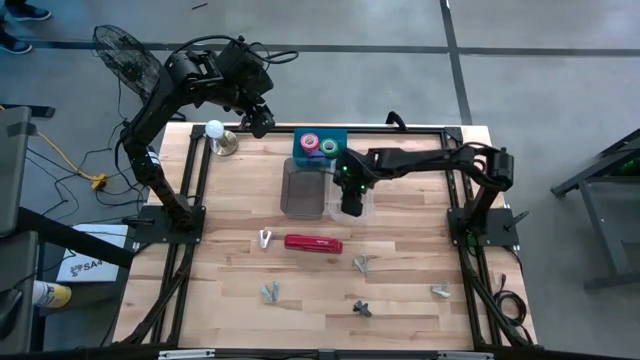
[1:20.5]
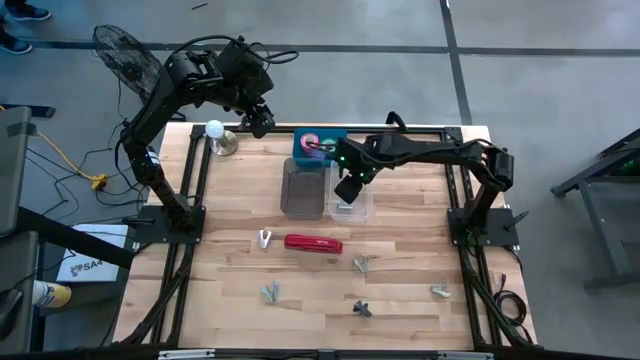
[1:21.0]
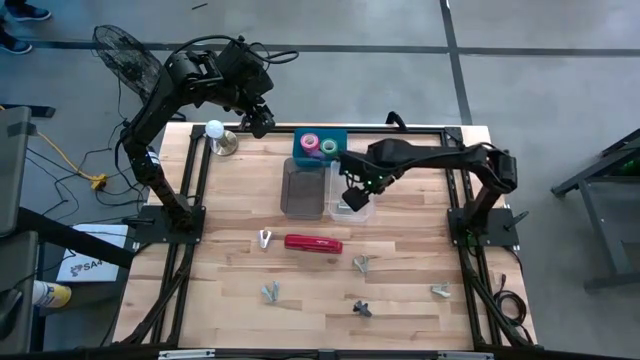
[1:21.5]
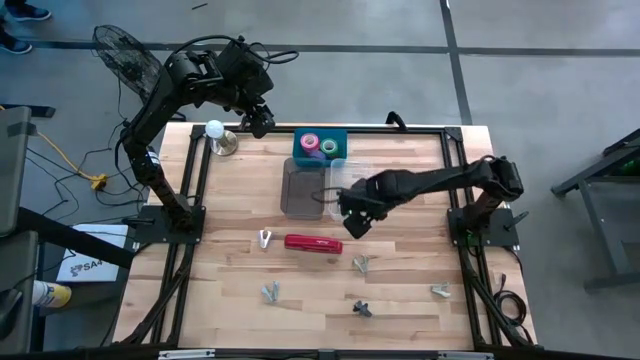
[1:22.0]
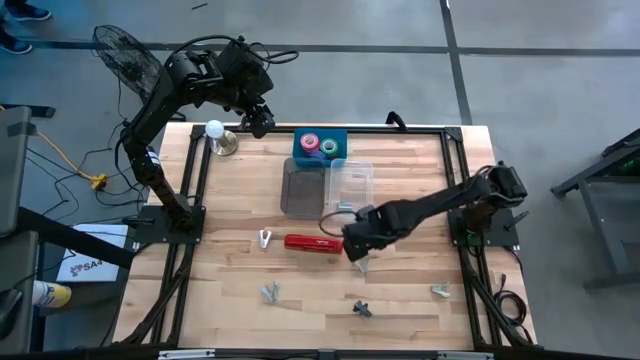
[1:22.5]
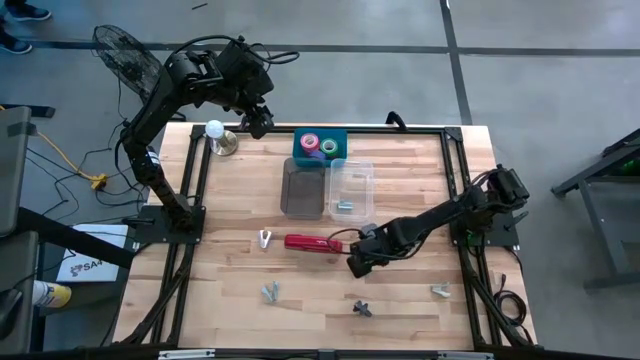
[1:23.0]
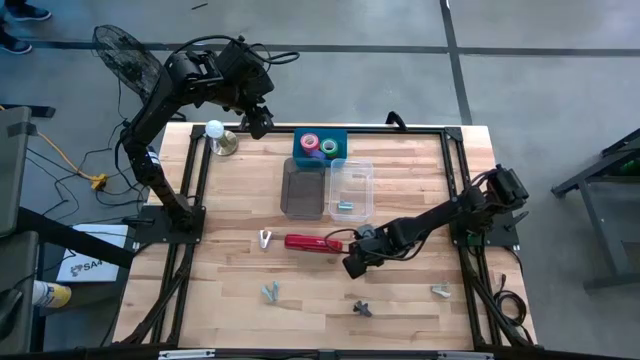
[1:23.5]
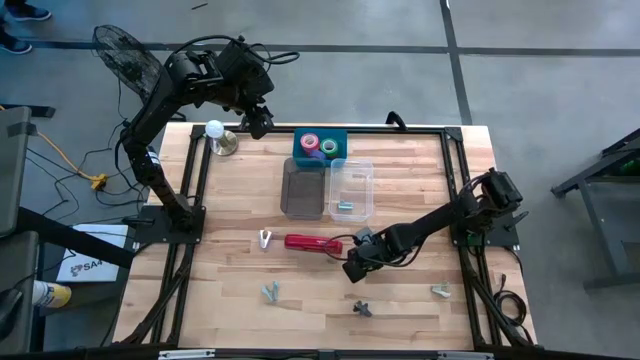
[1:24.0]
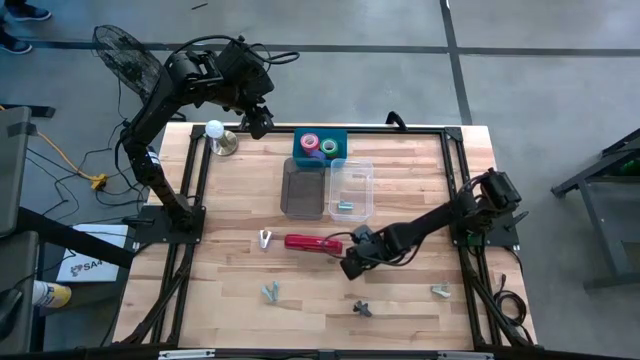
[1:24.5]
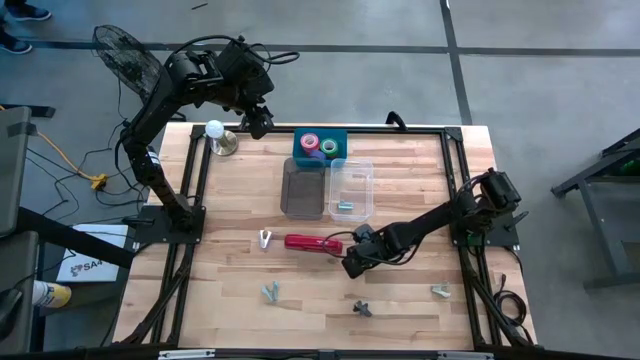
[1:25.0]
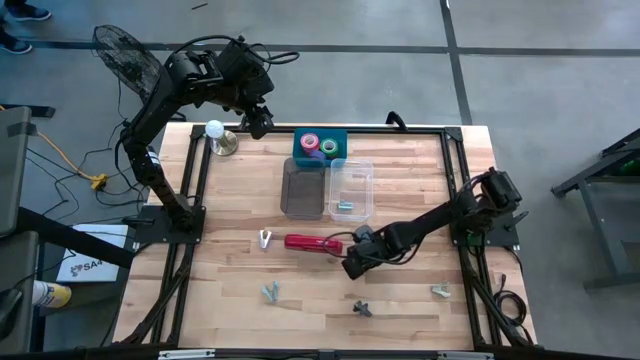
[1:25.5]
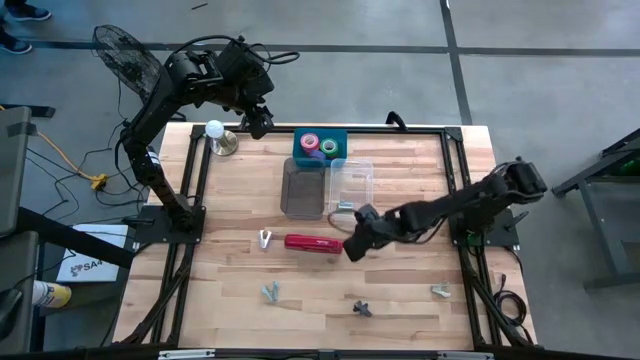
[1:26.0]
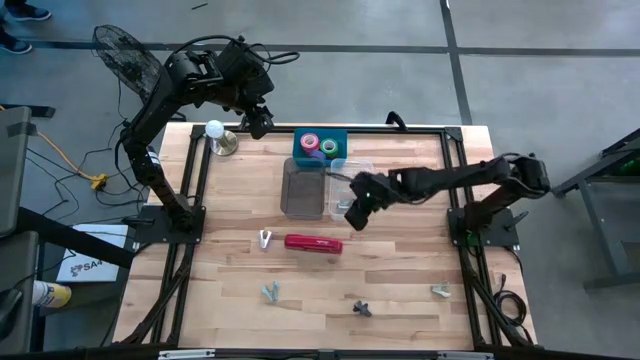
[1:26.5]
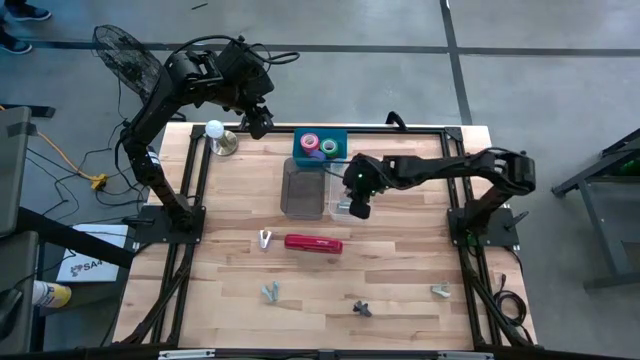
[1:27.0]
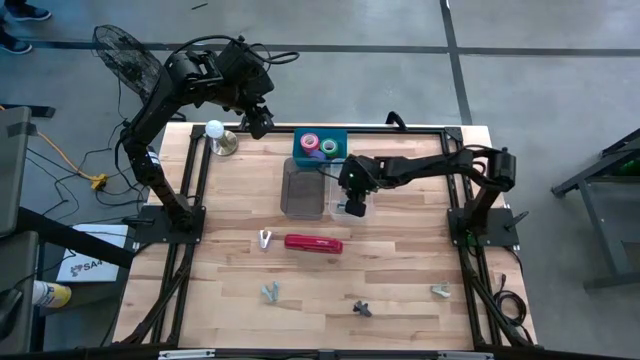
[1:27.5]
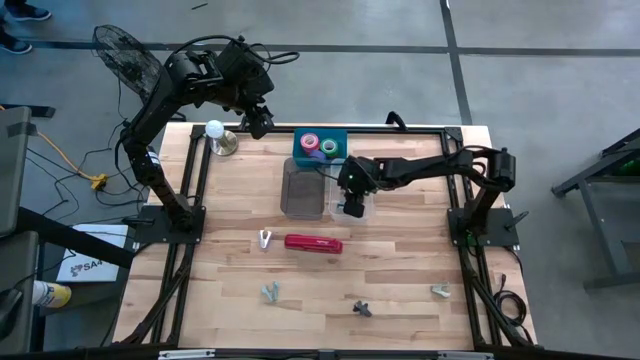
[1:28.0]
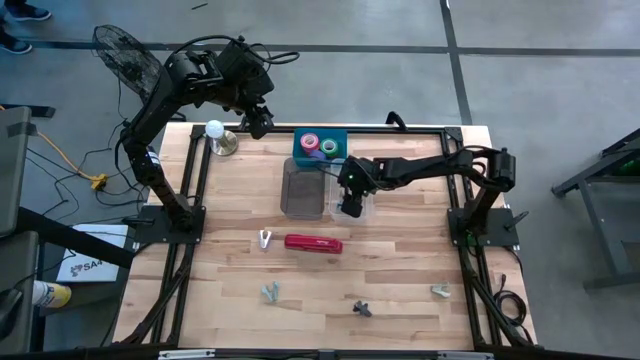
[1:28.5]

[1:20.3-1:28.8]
Task: Pick and place Stapler, Stapler remover, tape
Put the left gray staple remover into the transparent bin

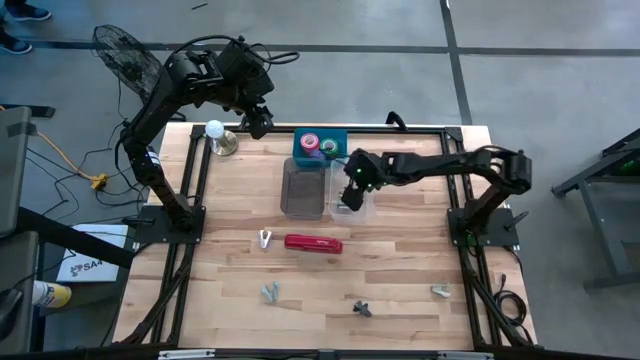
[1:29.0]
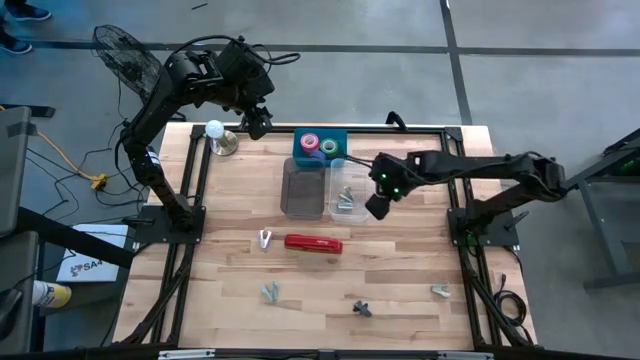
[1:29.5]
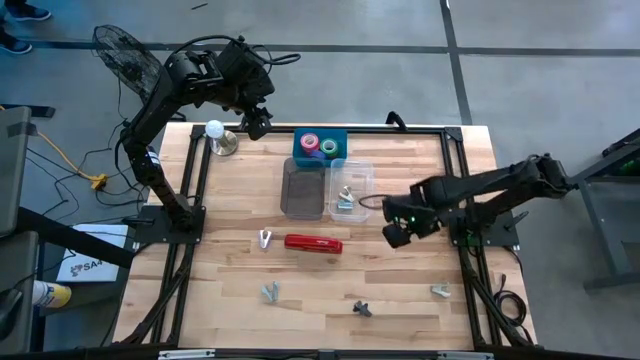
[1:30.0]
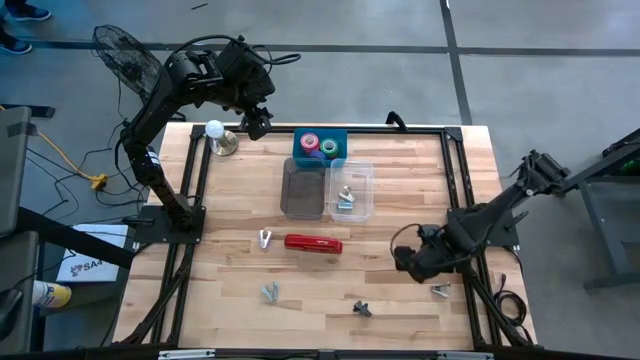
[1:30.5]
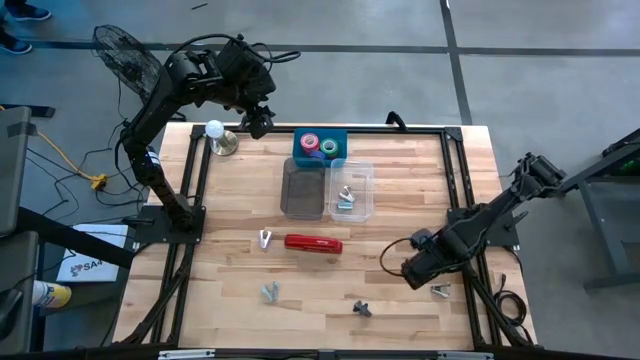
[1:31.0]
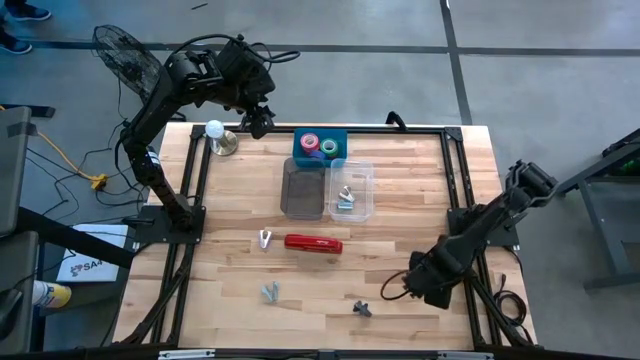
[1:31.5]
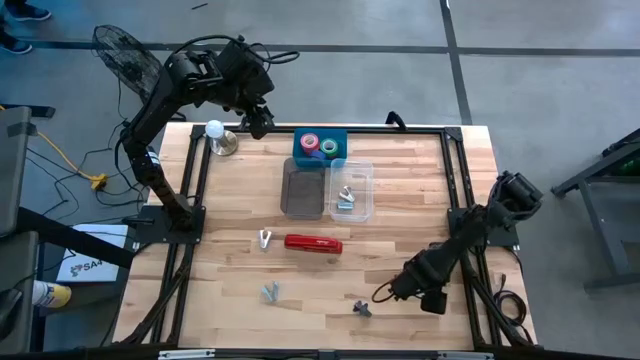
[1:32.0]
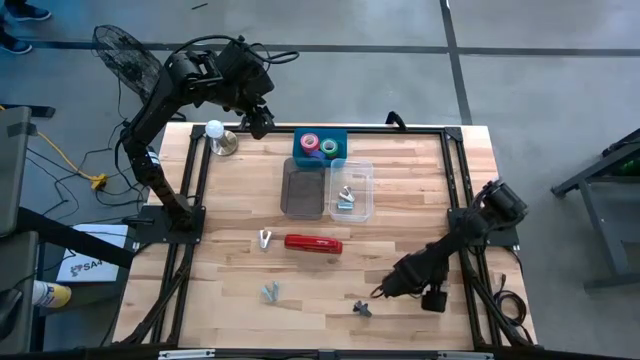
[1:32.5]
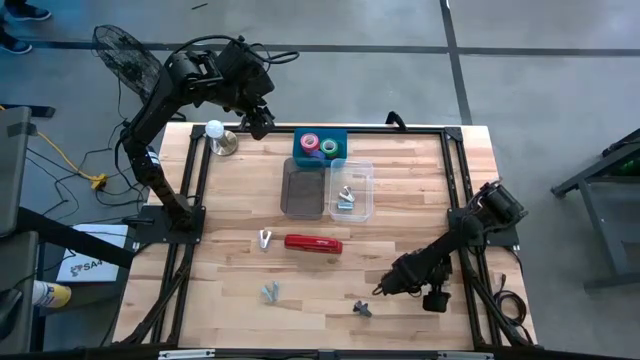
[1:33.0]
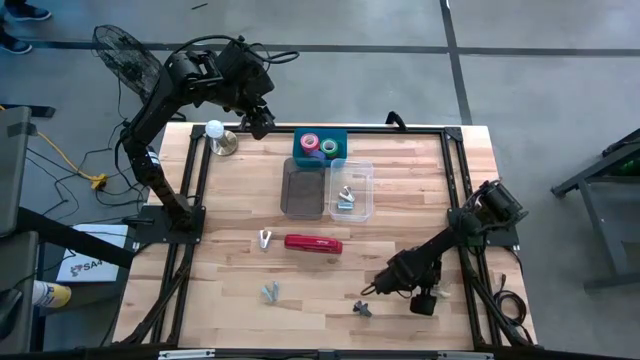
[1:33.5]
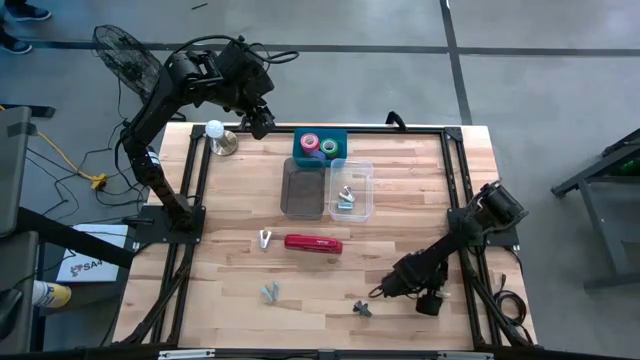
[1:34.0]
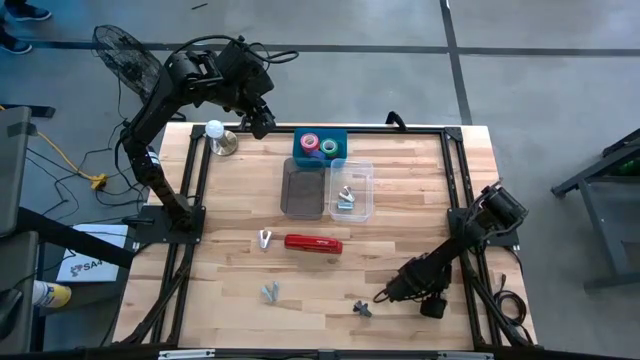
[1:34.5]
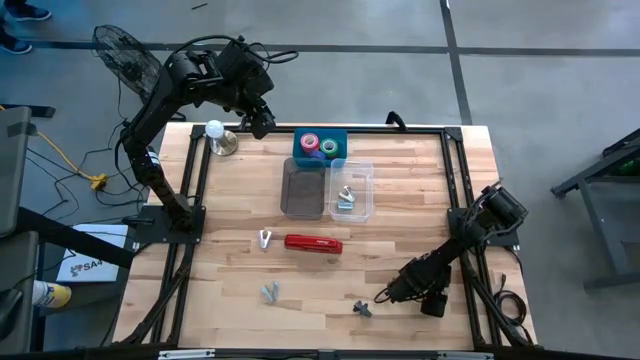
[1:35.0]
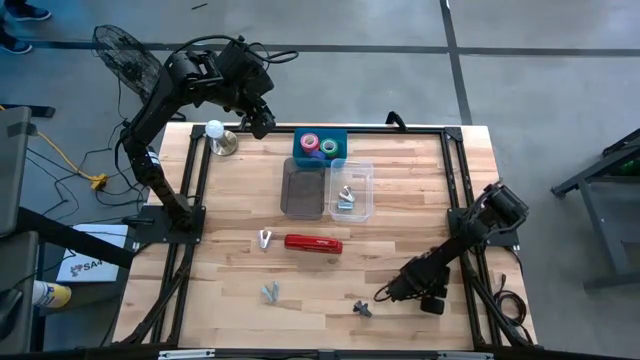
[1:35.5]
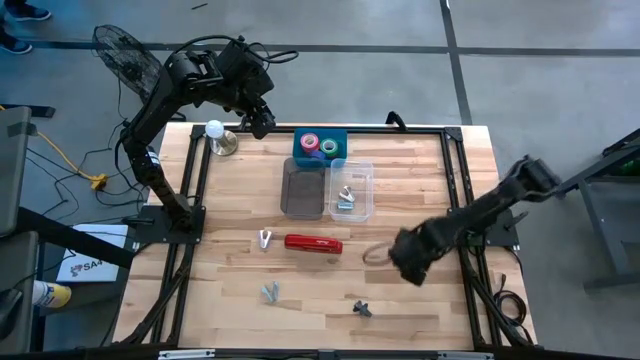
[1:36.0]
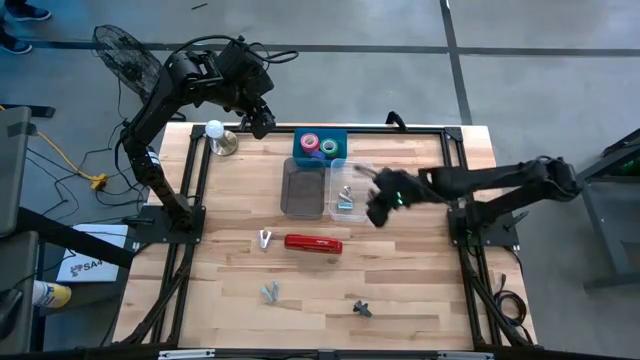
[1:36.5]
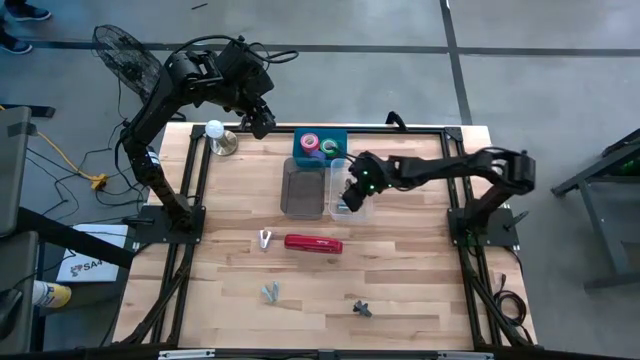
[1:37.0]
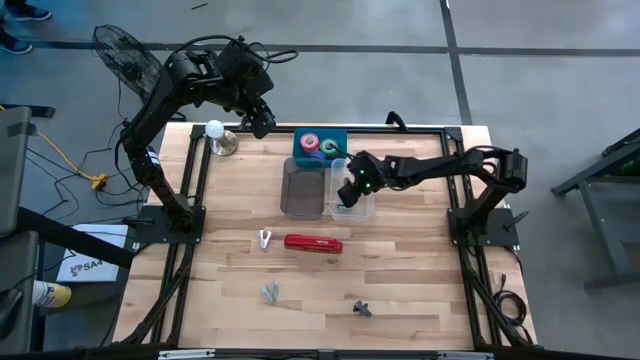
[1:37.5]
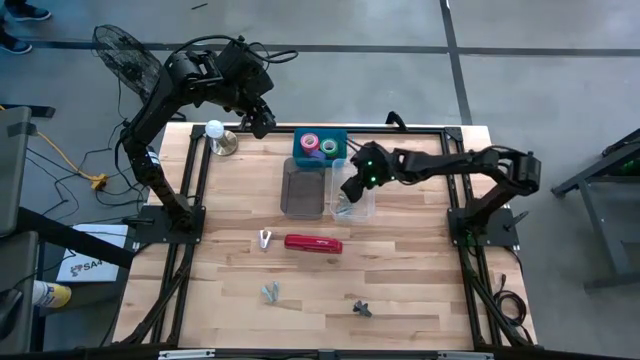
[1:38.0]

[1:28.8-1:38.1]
Put the gray staple remover into the transparent bin

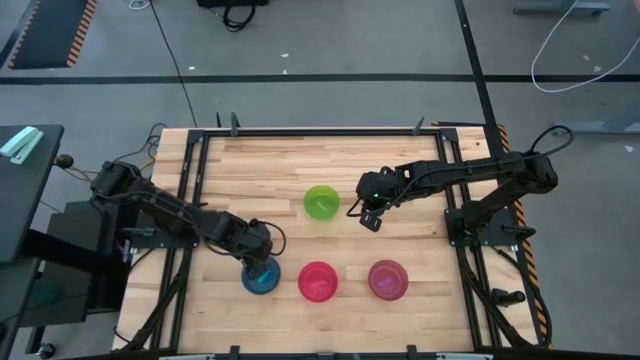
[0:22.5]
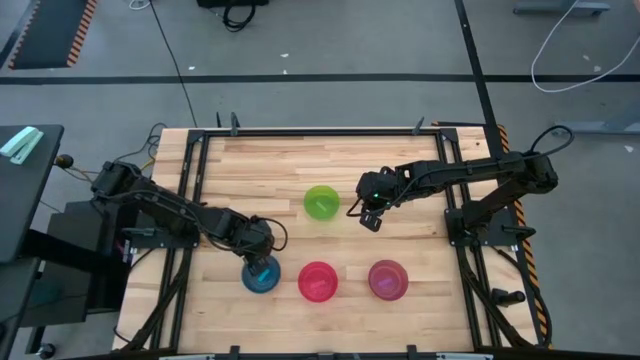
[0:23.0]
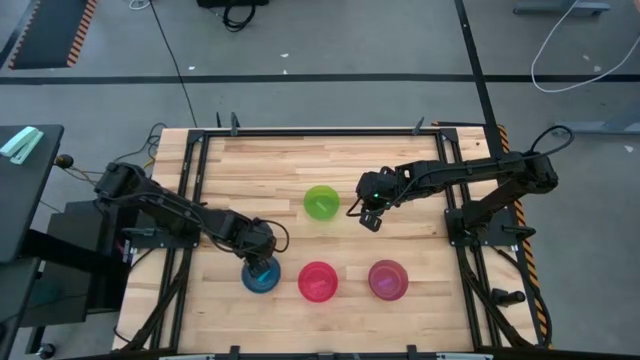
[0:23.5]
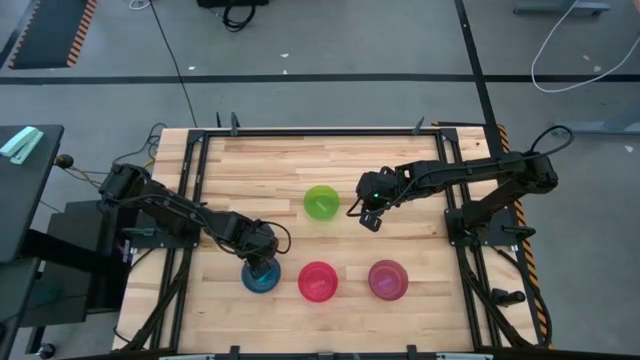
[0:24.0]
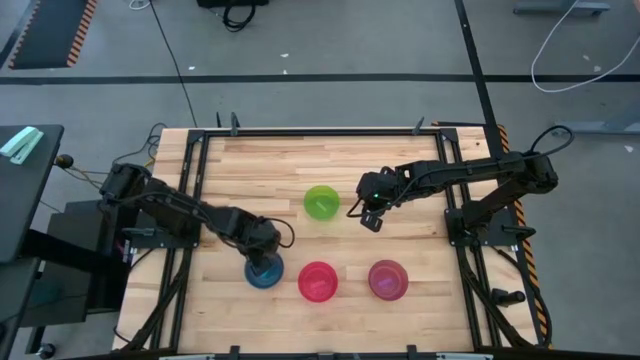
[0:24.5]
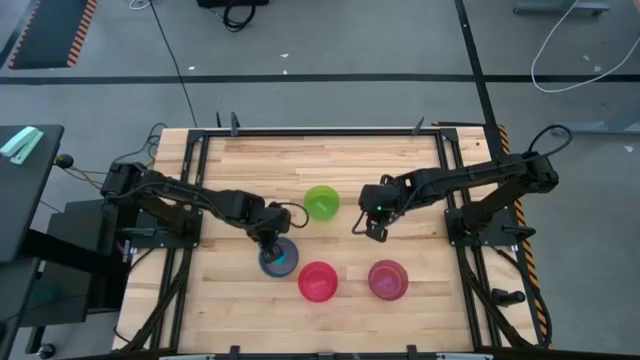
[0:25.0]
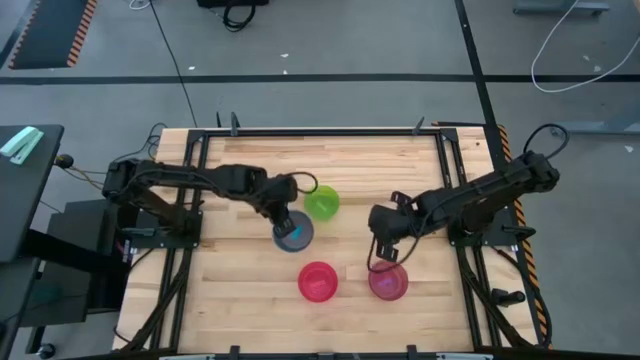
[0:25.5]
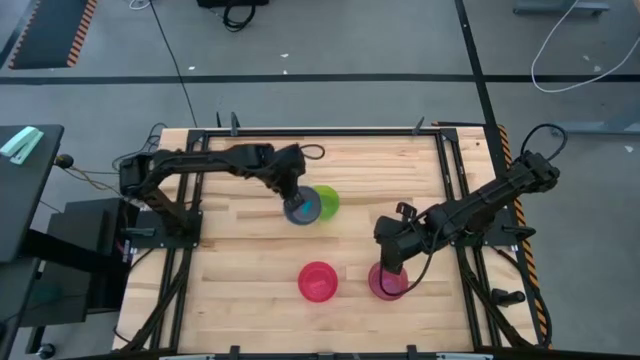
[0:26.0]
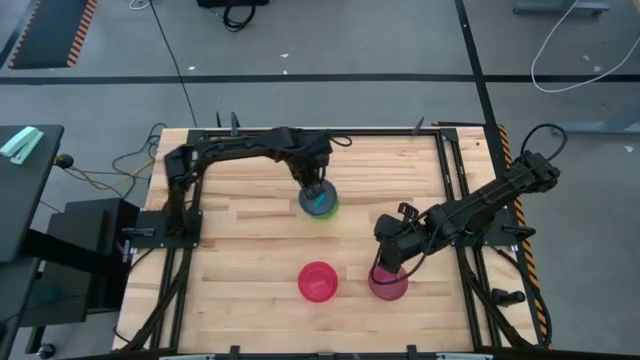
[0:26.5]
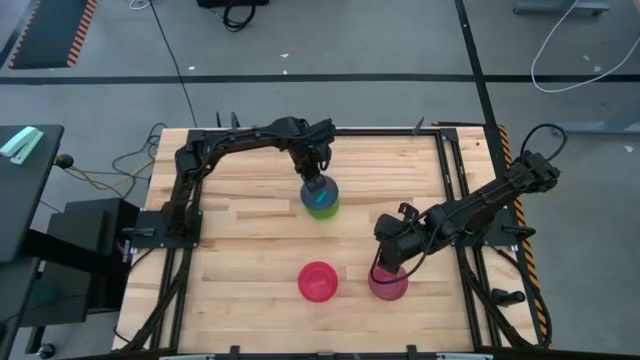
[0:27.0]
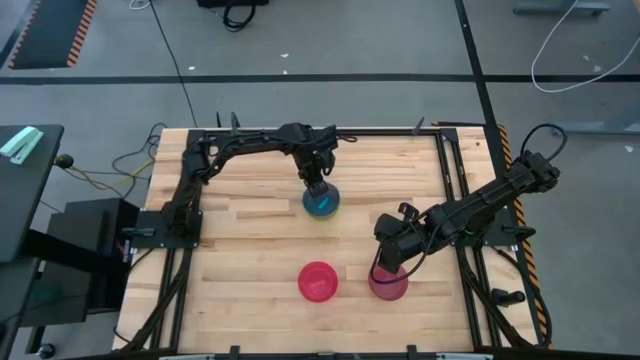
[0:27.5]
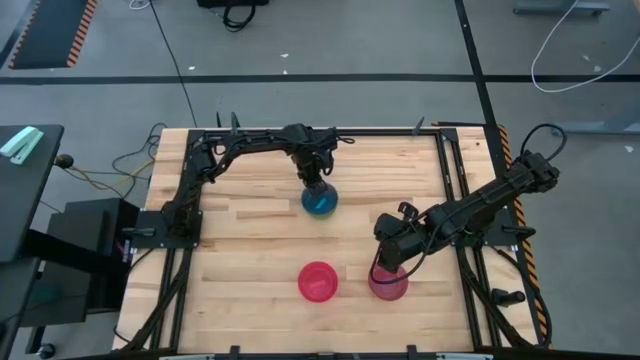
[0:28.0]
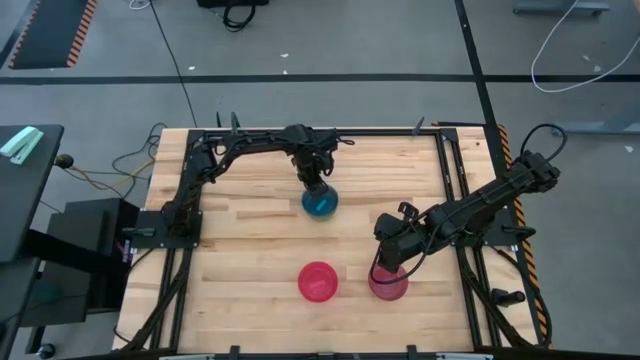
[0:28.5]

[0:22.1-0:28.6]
Task: Nest bowls inside each other
Stack the blue and orange bowls on the green bowl
